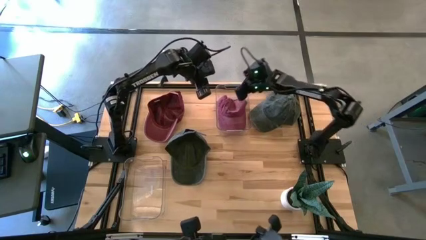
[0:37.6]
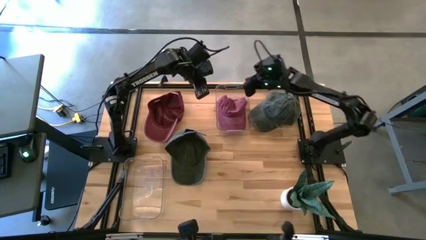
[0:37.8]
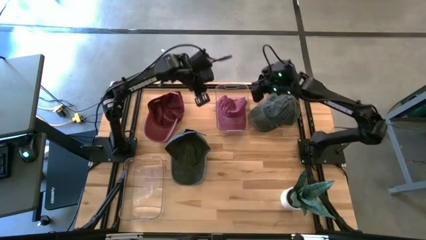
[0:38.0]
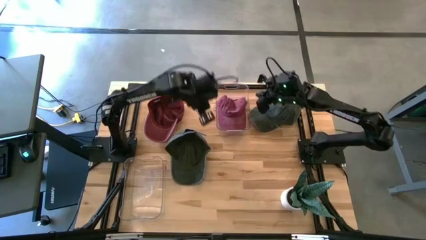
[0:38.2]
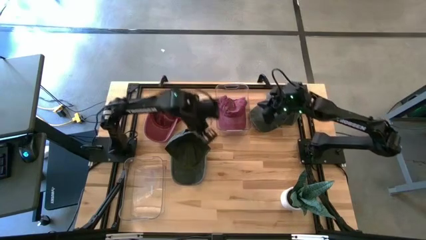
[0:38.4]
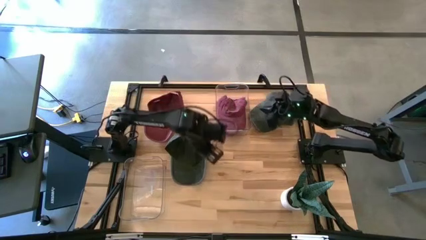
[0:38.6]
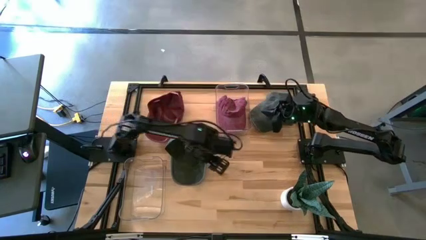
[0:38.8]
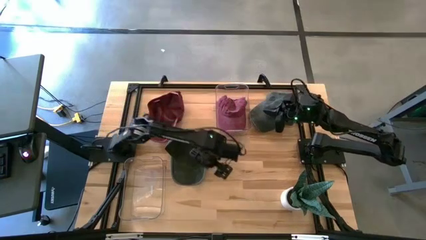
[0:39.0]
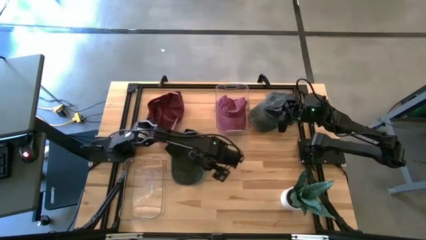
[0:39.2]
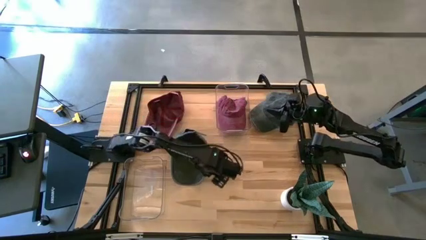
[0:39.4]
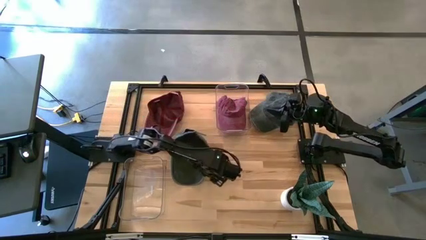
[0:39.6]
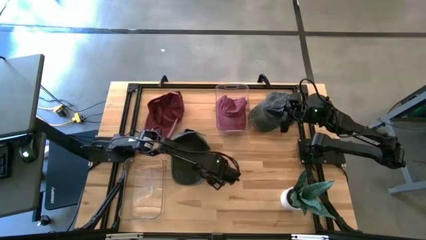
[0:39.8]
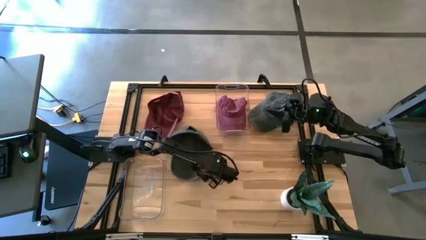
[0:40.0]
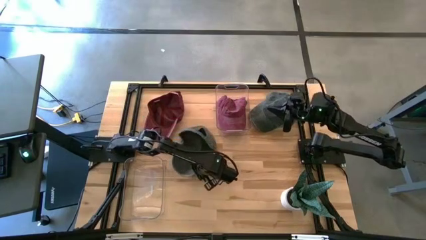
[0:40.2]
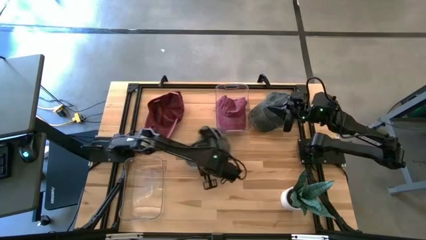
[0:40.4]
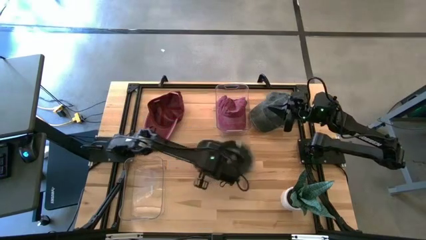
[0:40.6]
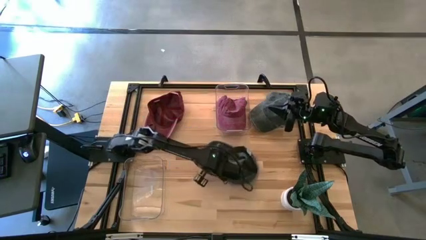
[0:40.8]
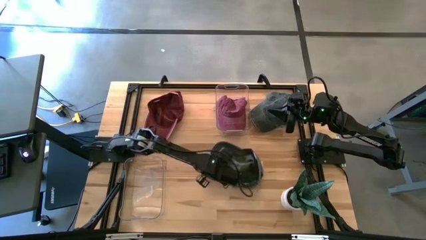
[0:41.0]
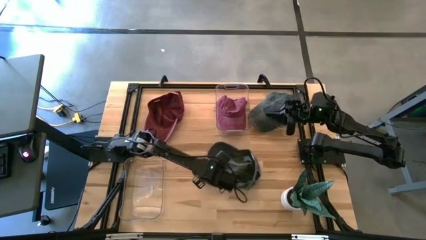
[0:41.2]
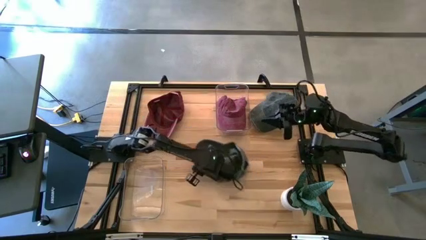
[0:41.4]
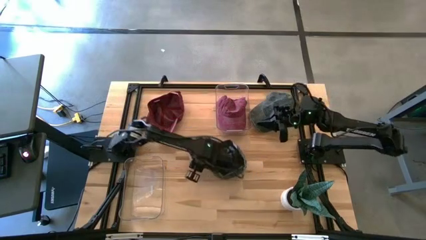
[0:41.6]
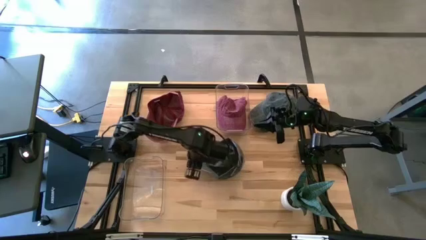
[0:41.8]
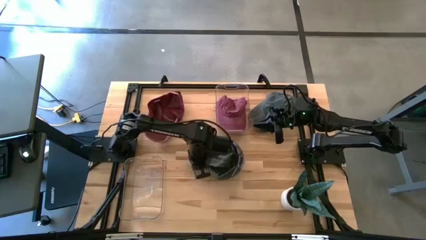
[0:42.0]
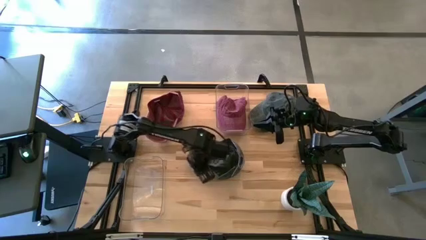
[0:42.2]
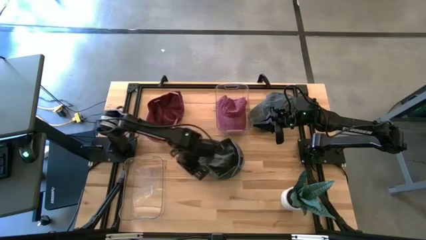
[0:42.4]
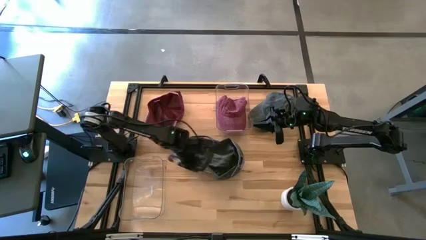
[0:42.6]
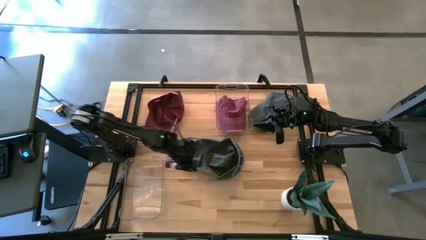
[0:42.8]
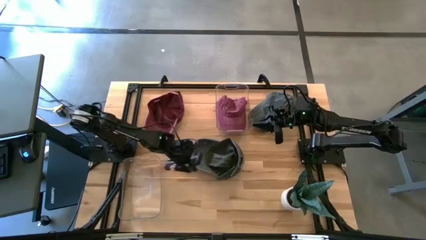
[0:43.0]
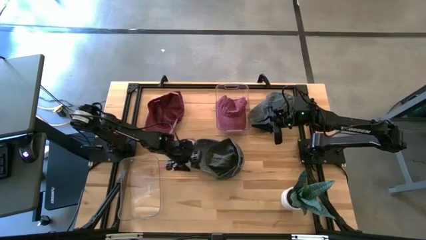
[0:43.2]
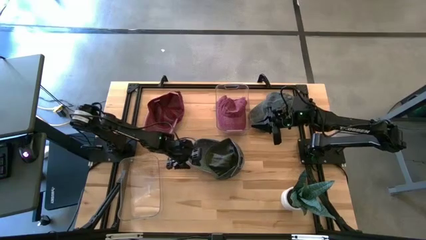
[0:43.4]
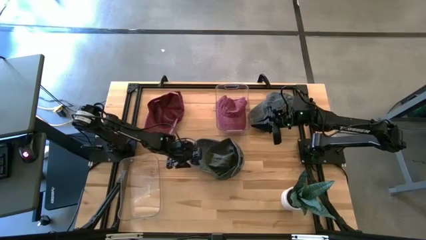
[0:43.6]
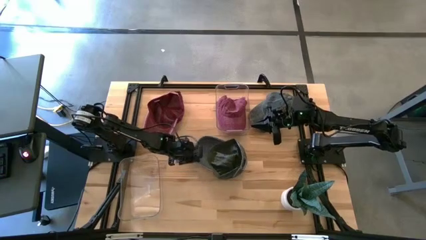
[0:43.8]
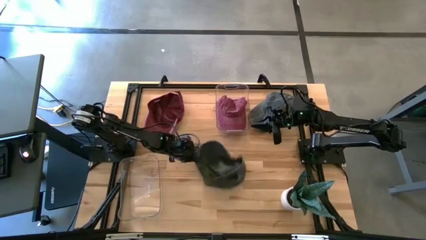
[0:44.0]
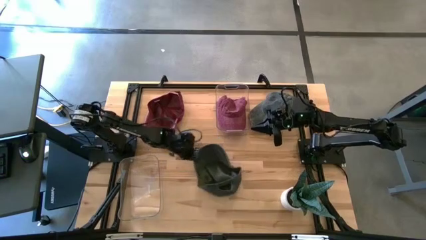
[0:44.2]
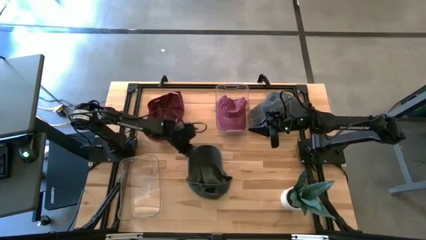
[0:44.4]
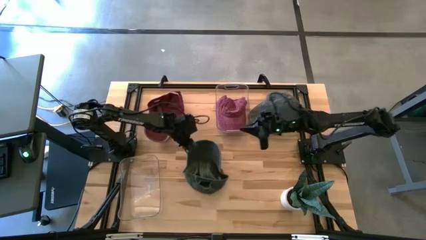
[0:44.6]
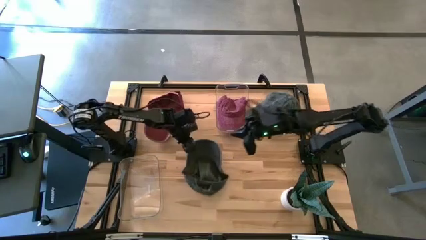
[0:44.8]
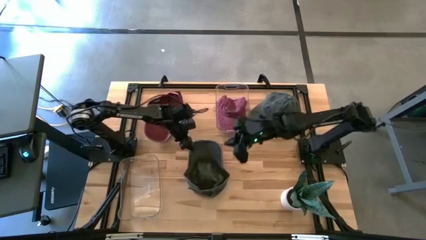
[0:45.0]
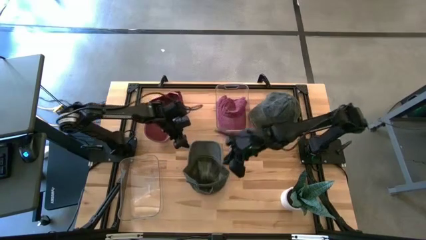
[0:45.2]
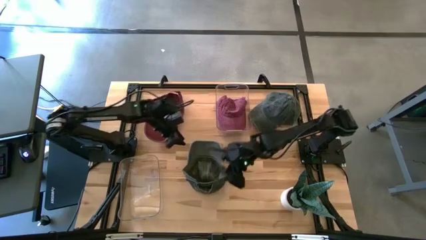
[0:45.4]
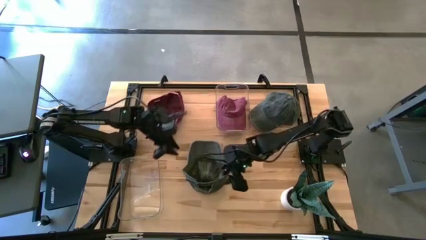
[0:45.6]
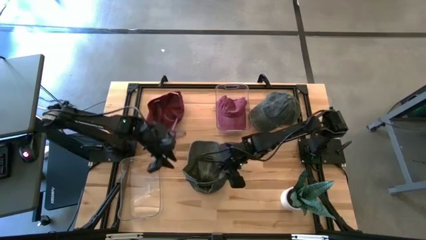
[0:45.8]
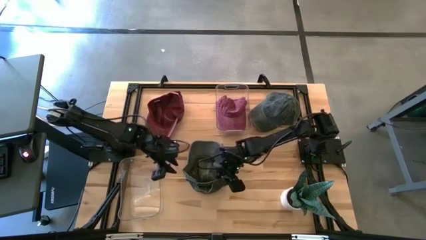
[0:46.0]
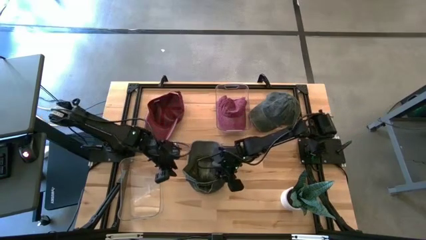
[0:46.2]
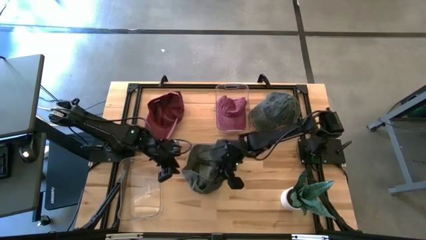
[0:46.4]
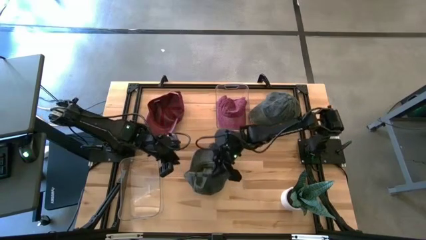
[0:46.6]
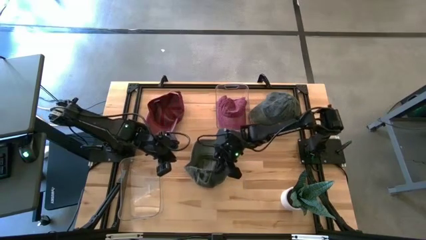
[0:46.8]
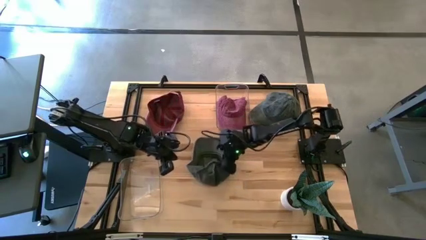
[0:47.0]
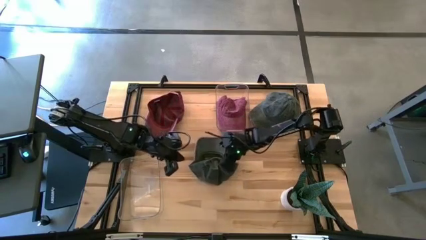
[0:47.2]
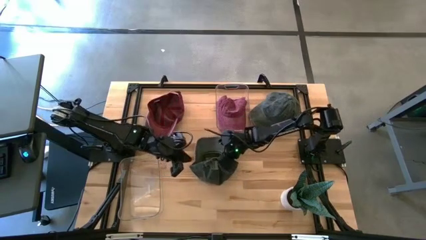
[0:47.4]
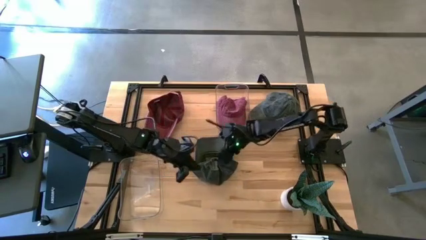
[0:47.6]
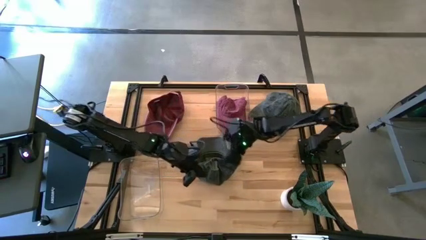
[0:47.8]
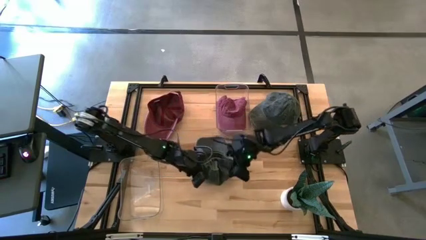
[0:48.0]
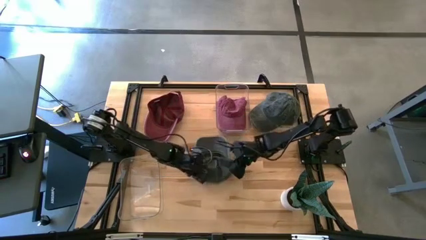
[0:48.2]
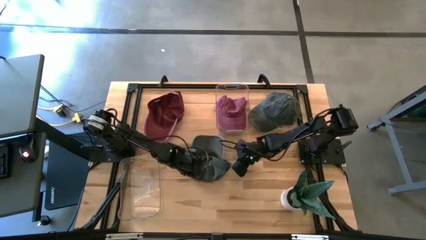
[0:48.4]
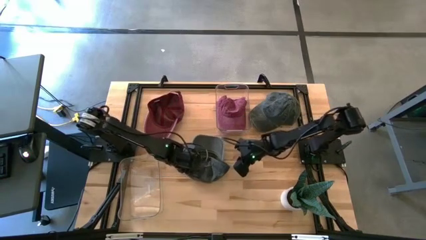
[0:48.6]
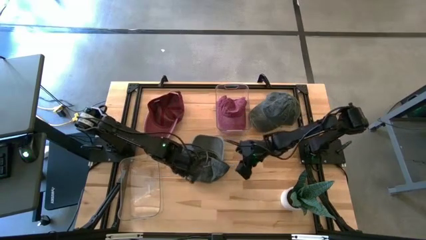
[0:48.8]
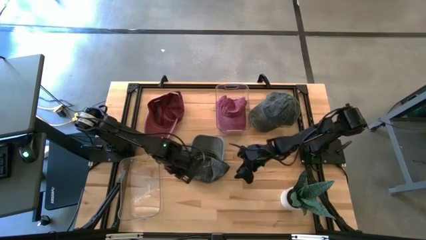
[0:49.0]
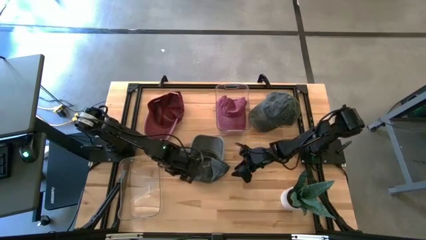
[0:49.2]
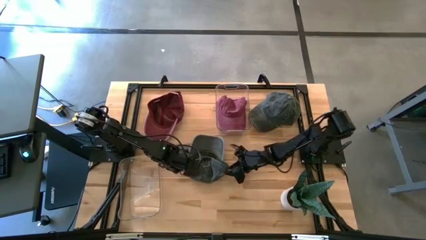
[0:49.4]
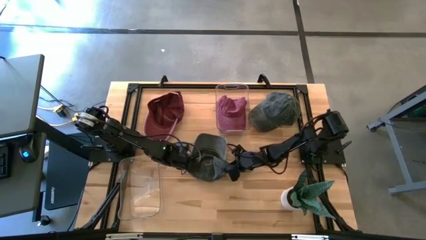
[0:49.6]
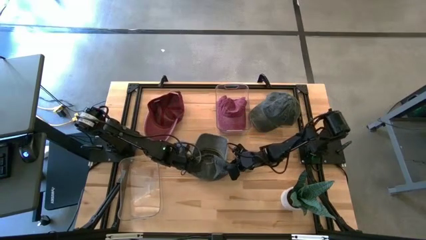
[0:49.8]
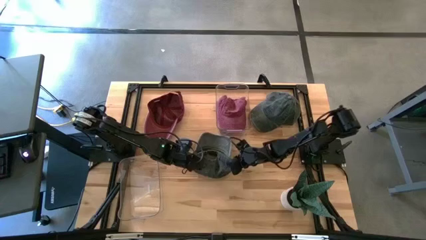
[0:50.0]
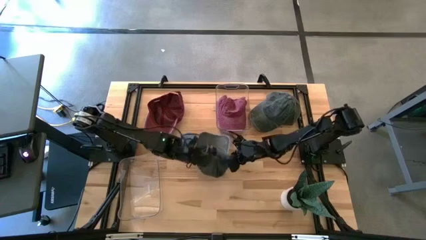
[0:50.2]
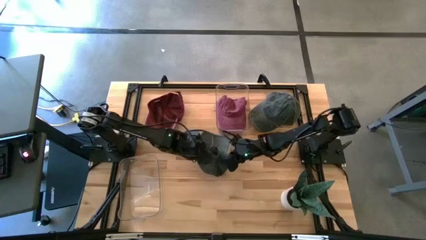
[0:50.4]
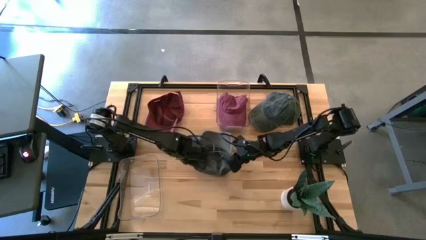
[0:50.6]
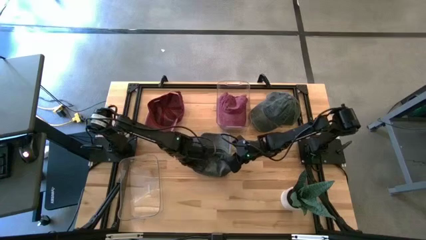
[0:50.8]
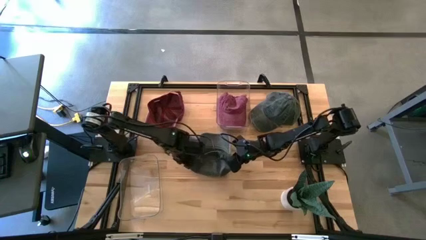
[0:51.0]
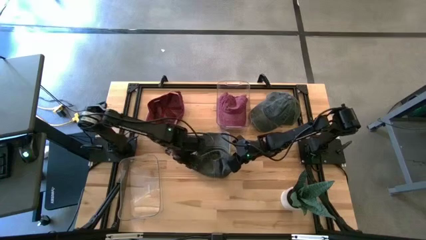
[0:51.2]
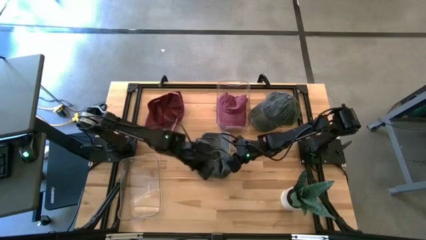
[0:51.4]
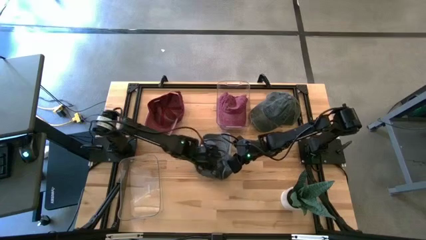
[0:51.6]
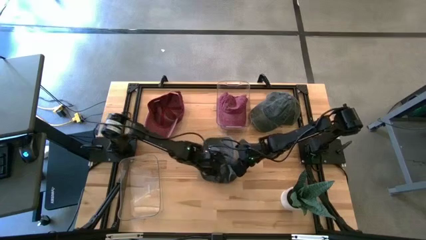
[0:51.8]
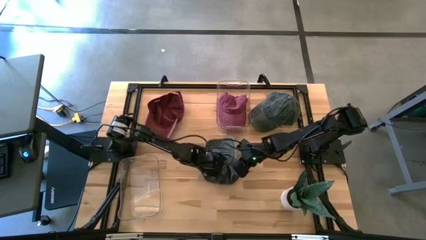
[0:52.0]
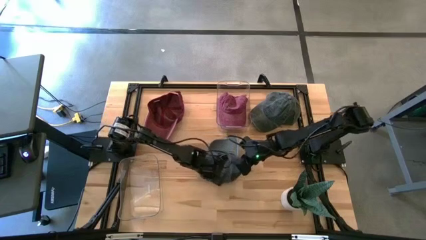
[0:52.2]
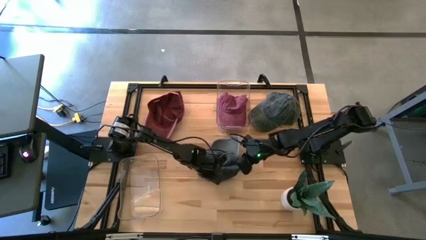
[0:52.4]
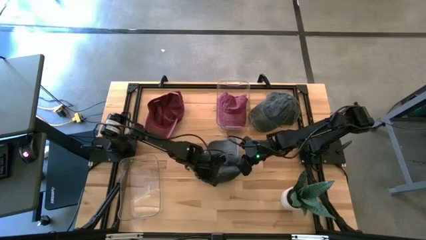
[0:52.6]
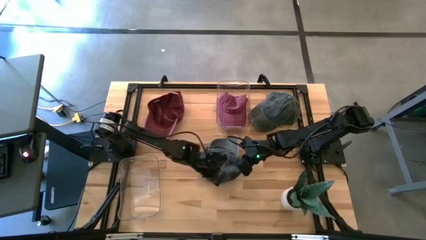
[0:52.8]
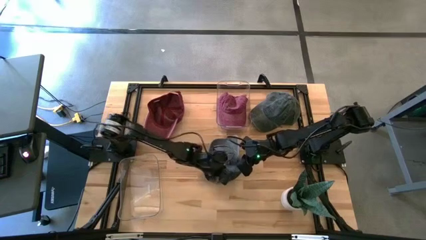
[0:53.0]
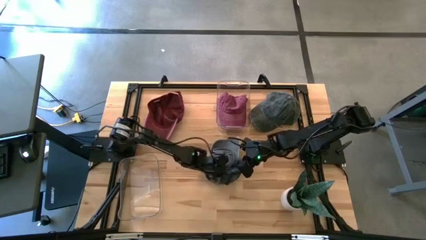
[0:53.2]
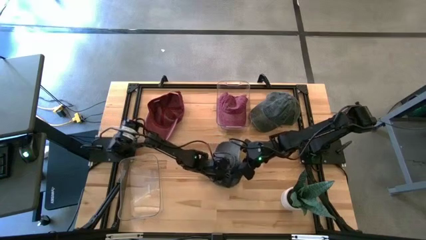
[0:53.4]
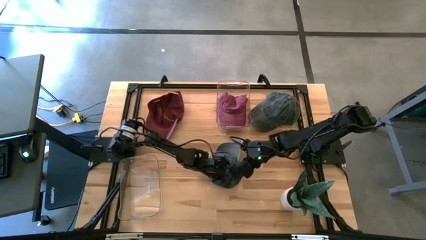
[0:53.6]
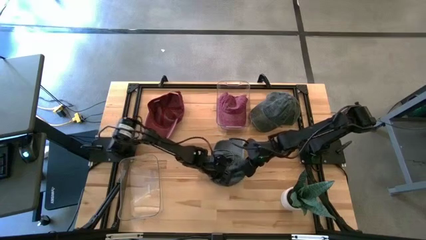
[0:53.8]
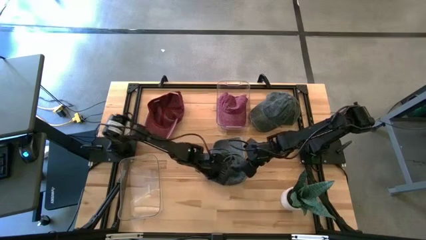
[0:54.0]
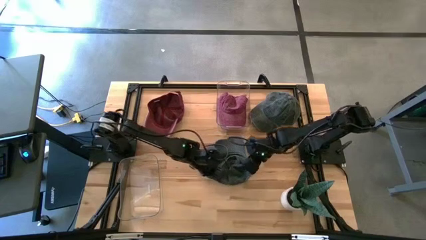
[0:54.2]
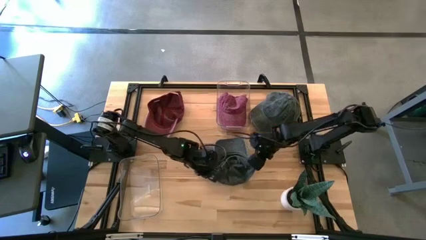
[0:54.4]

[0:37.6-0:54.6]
Task: Pick & Place hat
Put the left black cap into the bottom transparent bin
